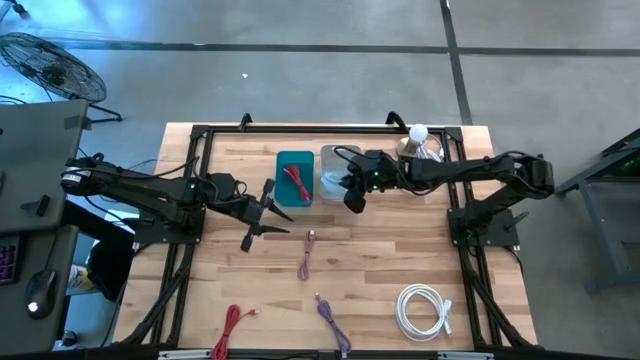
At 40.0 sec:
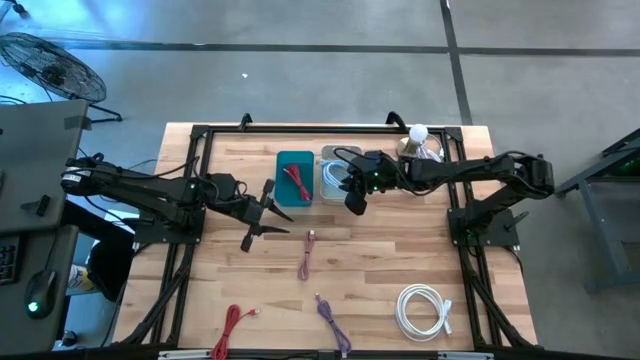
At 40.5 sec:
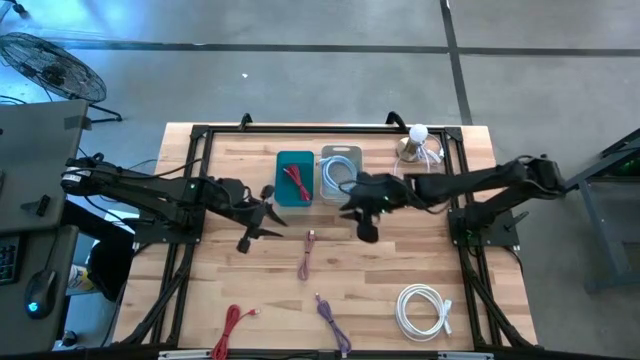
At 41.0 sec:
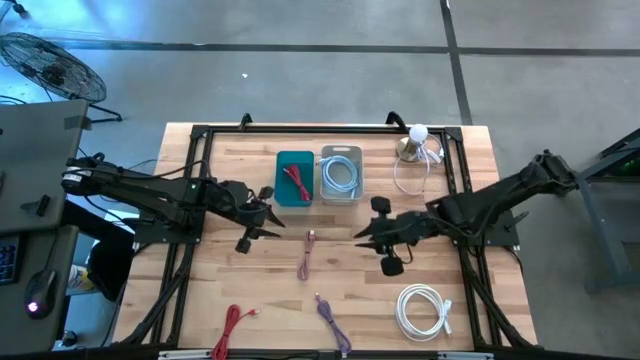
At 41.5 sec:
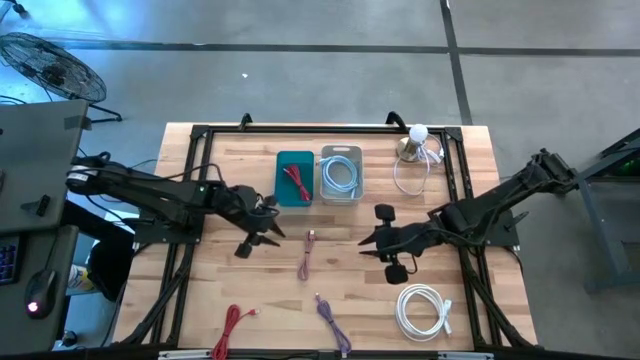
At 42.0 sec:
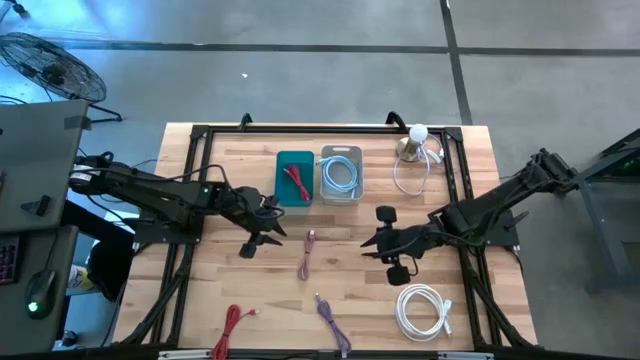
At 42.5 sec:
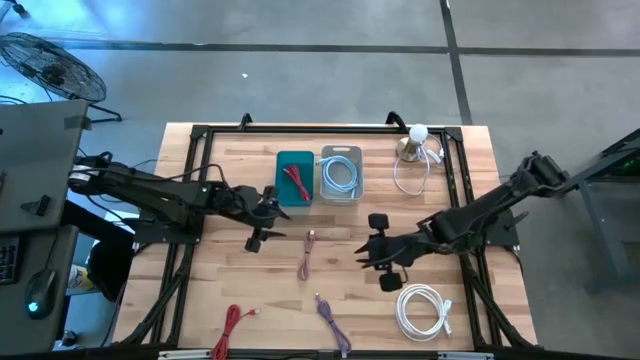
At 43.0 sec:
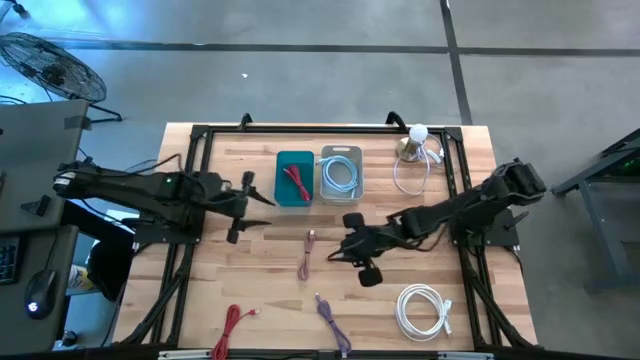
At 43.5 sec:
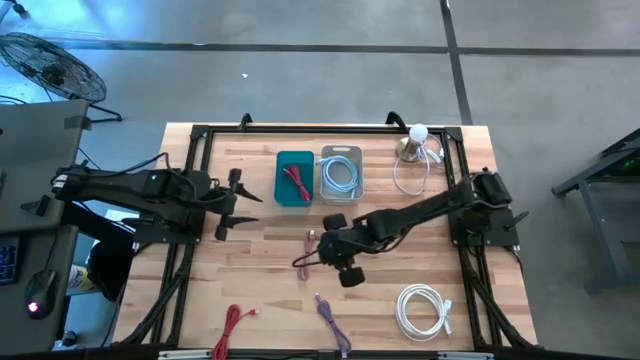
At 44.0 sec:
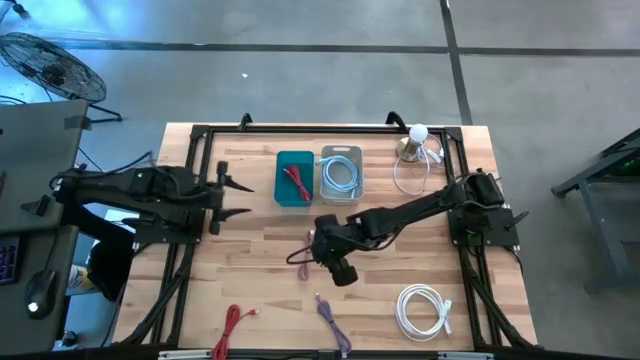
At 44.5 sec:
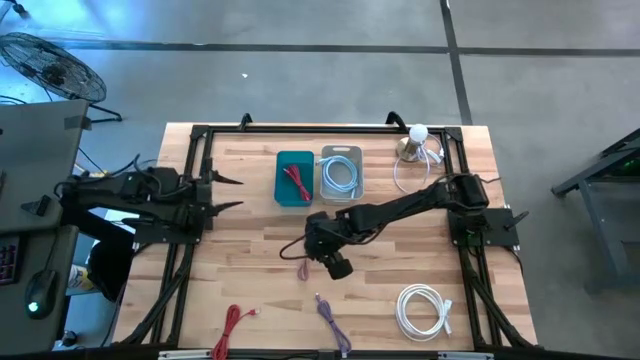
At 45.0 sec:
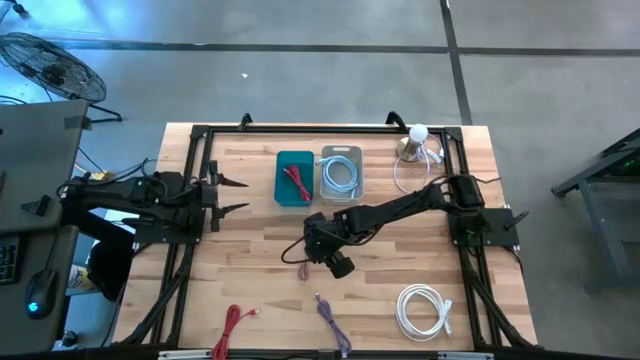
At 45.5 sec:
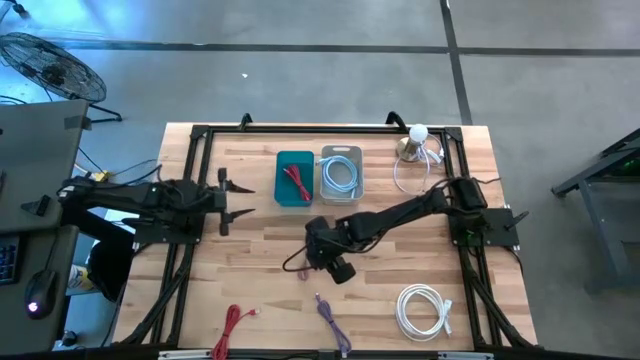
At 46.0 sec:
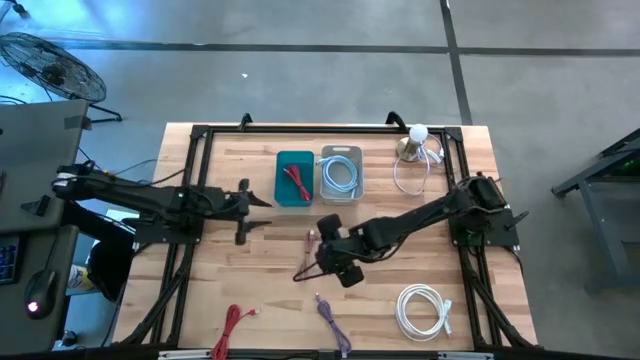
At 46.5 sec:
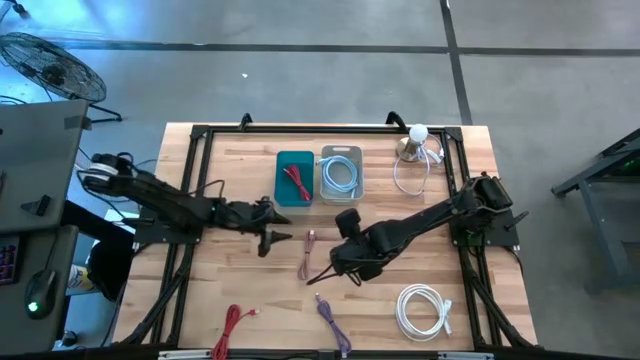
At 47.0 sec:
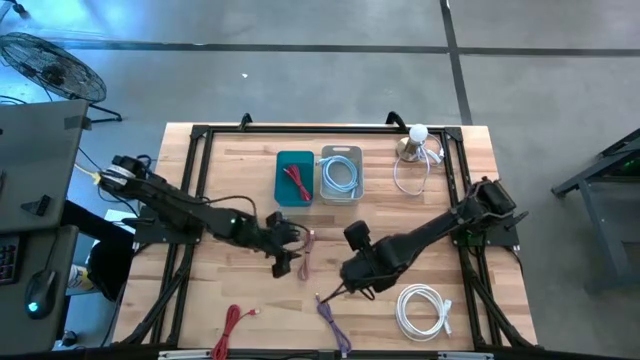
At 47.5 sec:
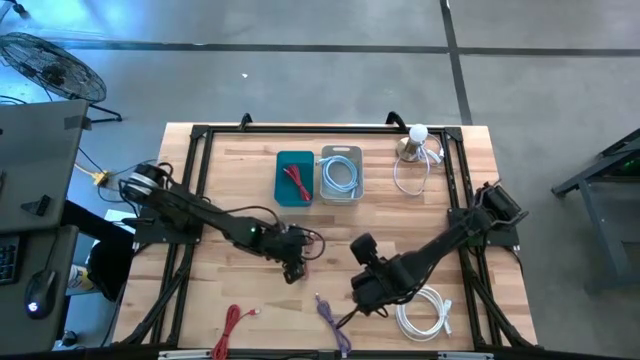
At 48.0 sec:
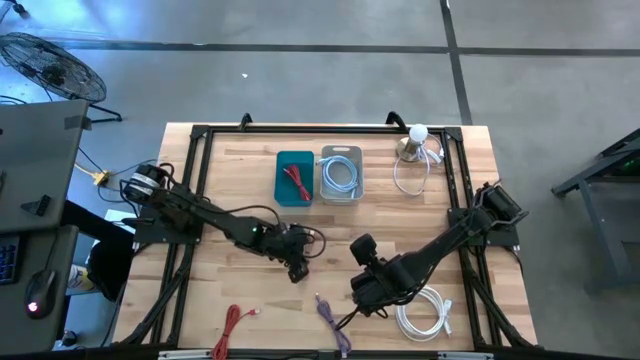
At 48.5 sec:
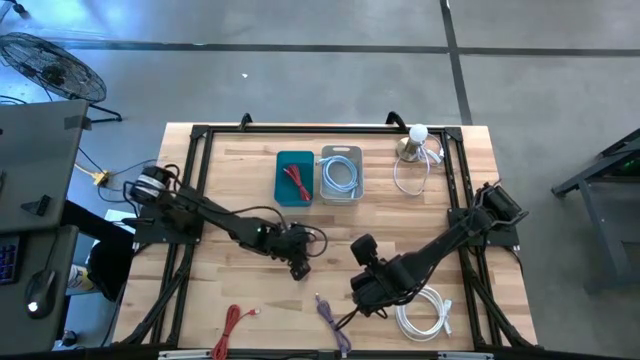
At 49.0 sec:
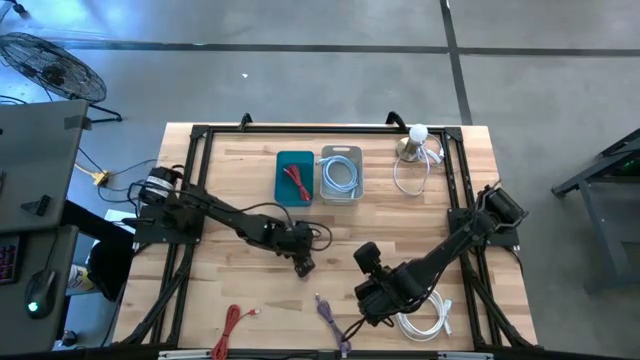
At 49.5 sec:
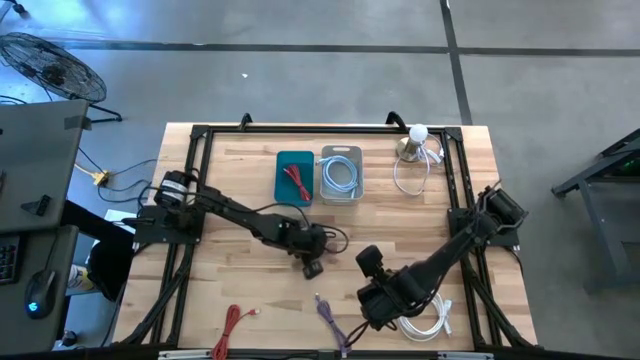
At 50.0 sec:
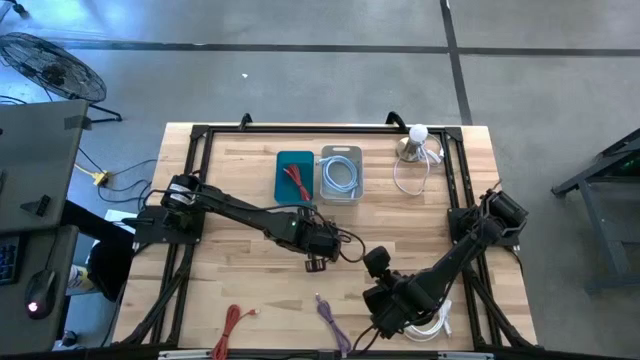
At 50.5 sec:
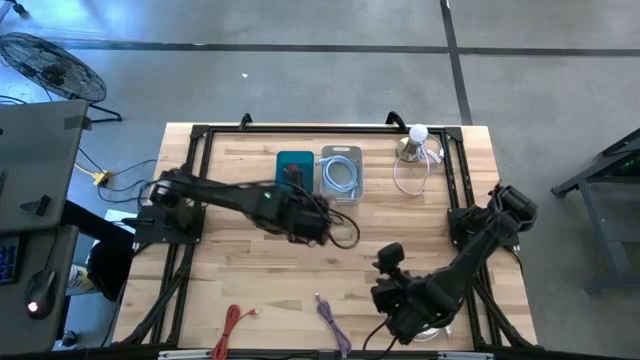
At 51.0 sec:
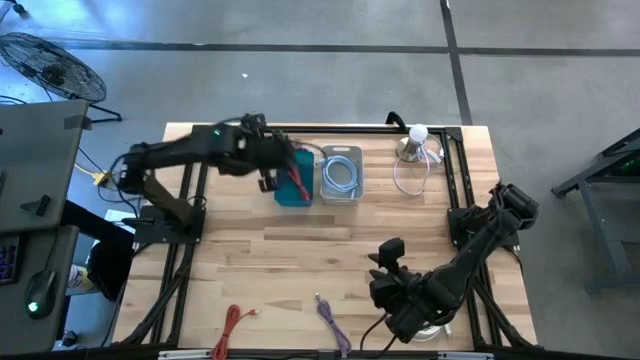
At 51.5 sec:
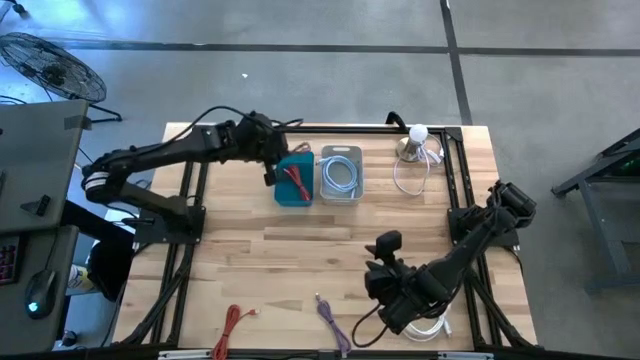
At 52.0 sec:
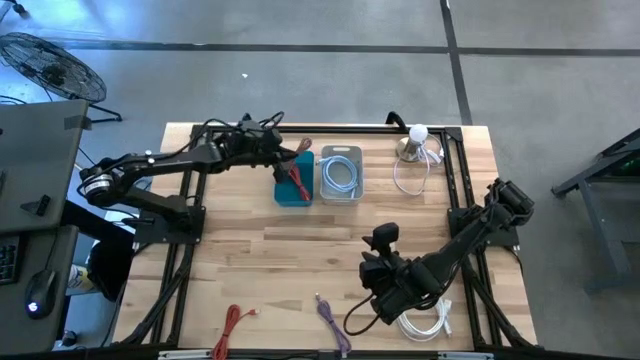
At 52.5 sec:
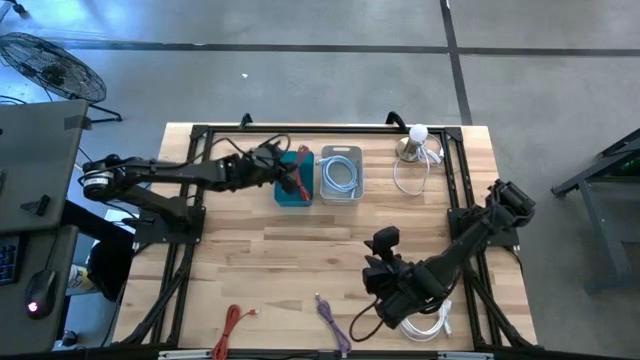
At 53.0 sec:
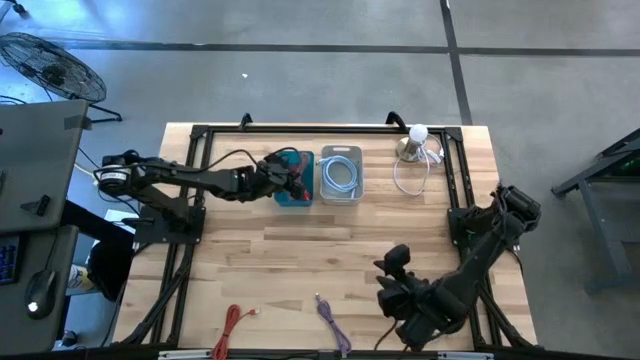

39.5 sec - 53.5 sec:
Task: Pick & Place USB Port
Put the pink charger cable into the blue bin

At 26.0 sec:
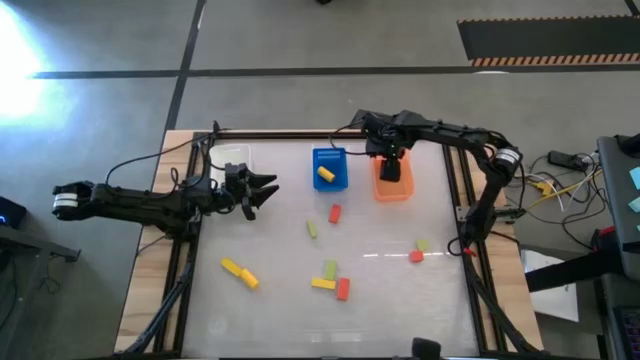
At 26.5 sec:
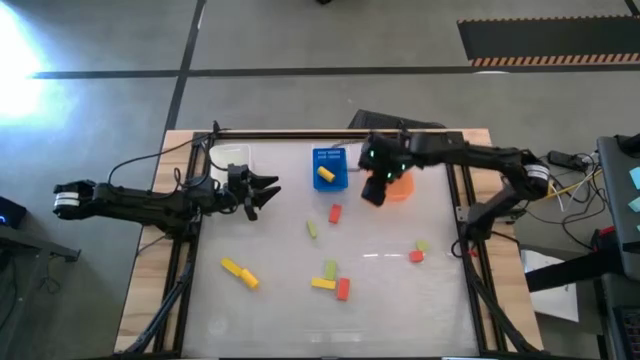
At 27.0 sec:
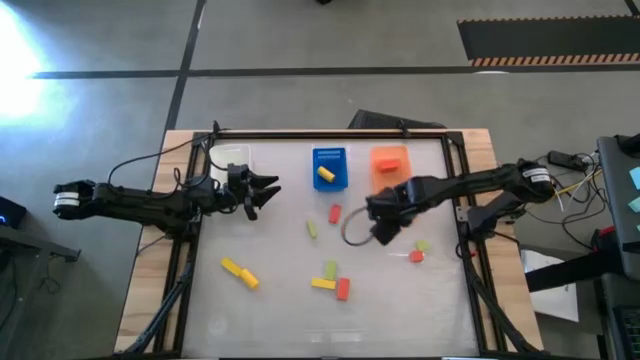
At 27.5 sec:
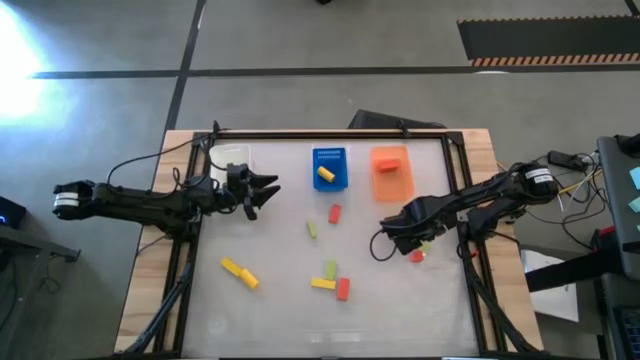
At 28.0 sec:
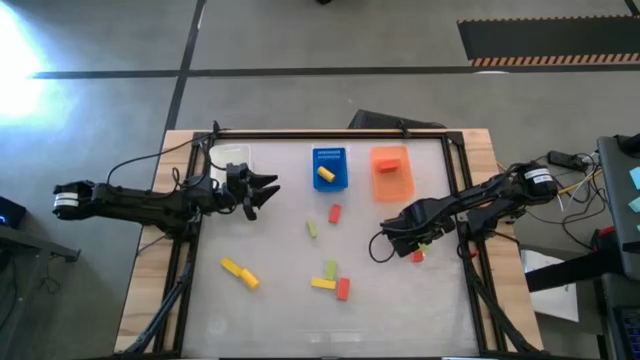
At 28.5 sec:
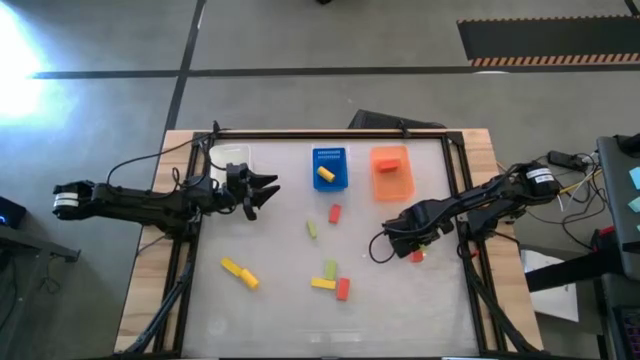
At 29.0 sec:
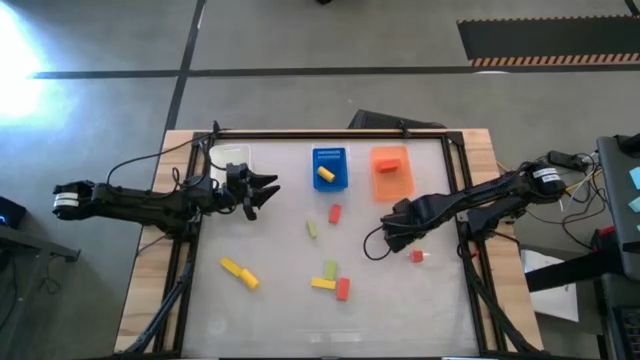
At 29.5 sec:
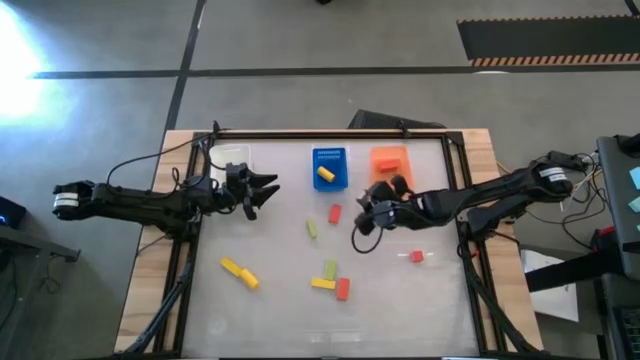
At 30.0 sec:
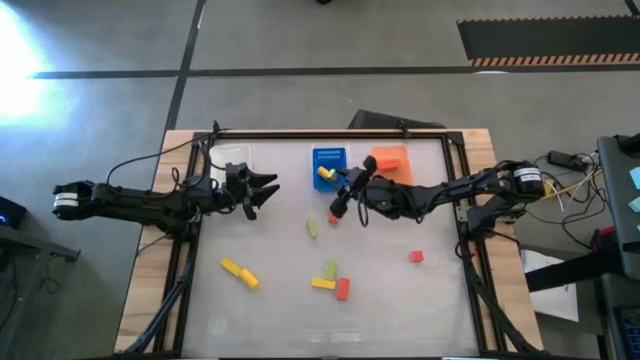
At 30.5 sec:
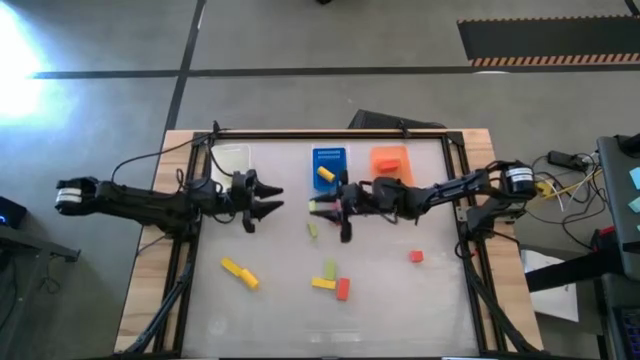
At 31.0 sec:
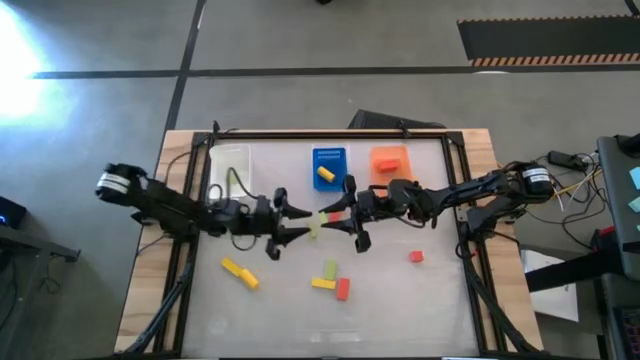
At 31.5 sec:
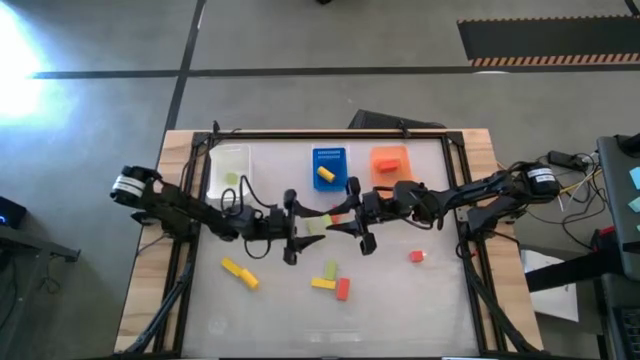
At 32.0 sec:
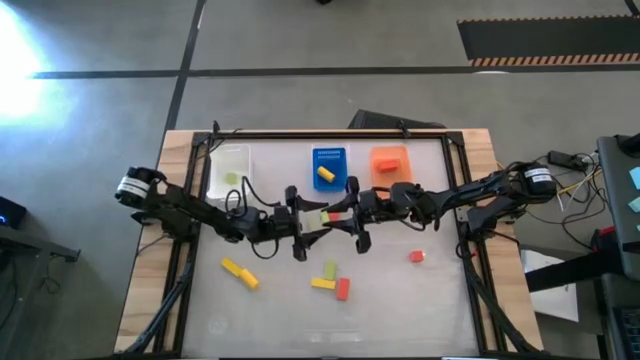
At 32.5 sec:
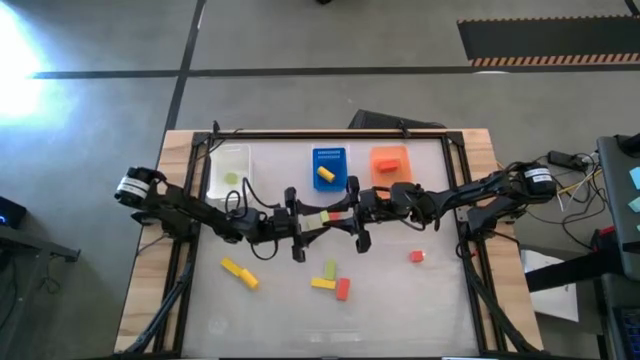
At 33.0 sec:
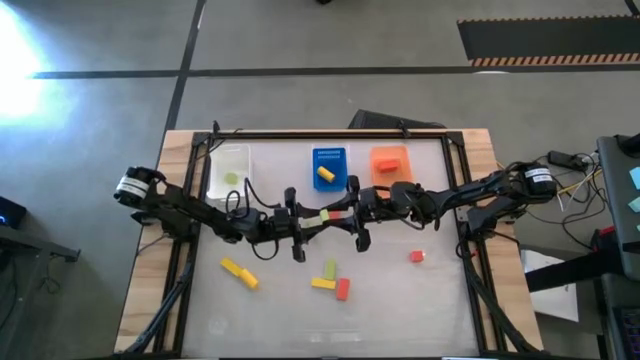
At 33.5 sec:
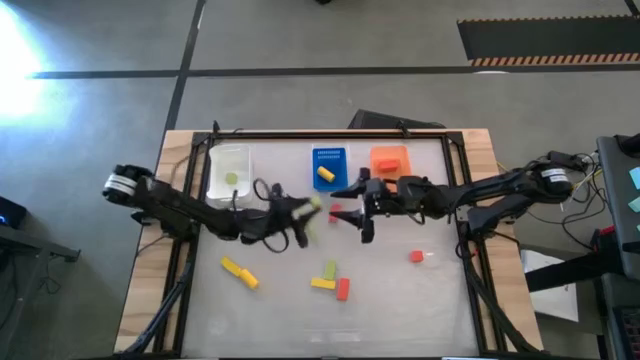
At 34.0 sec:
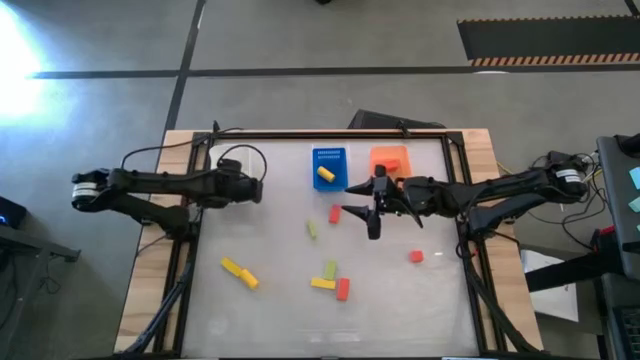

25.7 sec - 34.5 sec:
Task: Sort & place blocks by color
Put the green block into the white bin
